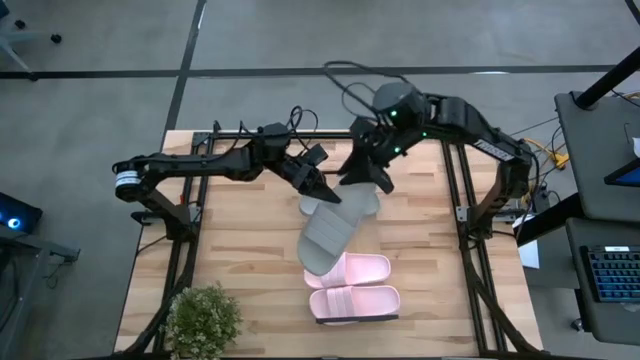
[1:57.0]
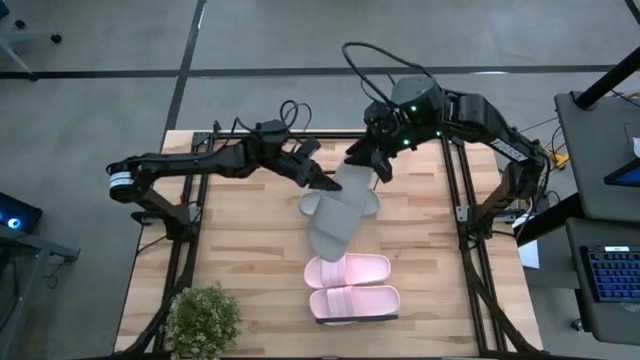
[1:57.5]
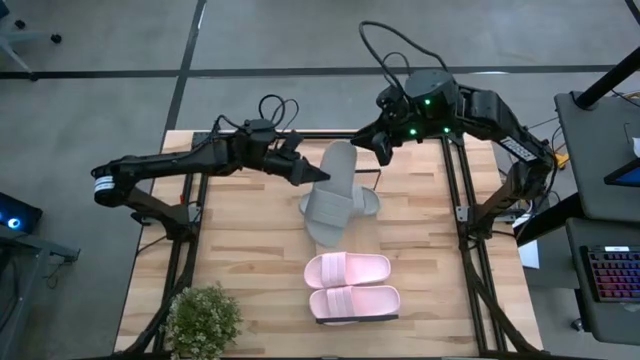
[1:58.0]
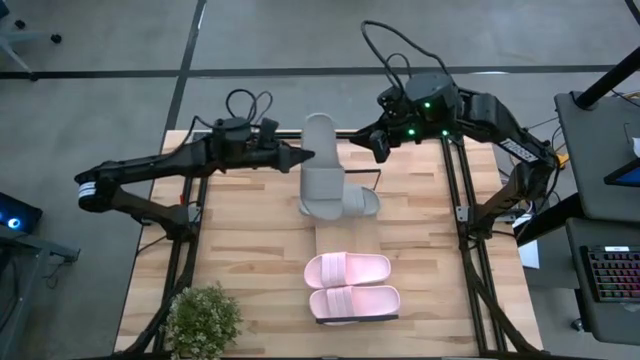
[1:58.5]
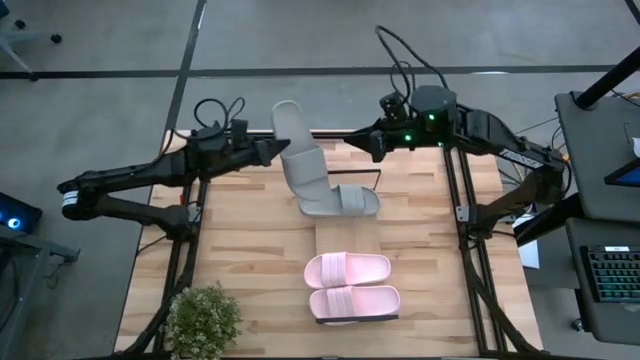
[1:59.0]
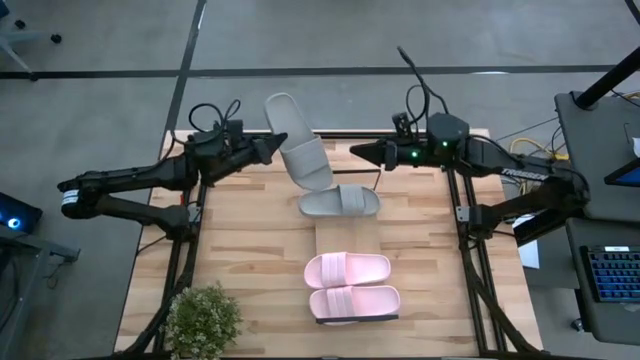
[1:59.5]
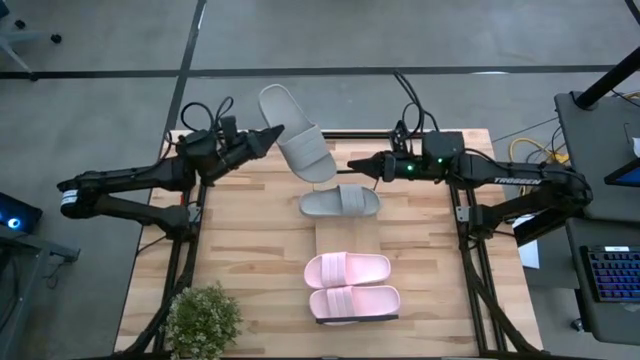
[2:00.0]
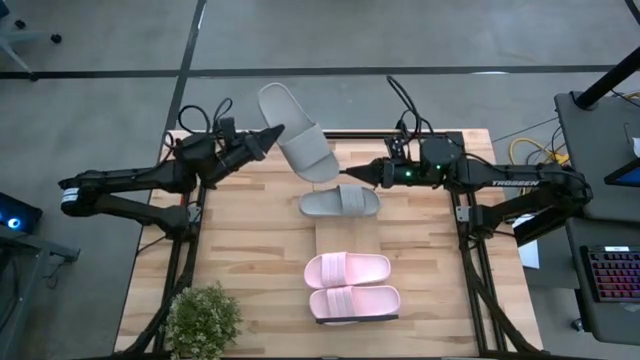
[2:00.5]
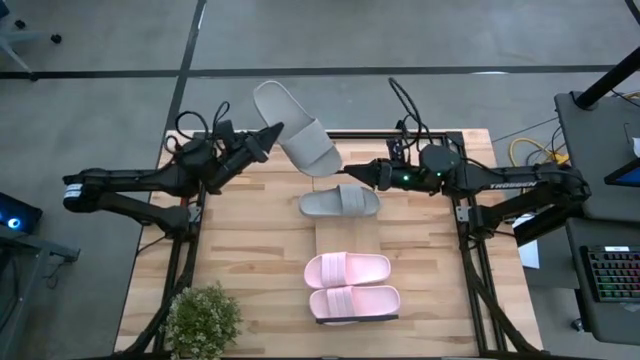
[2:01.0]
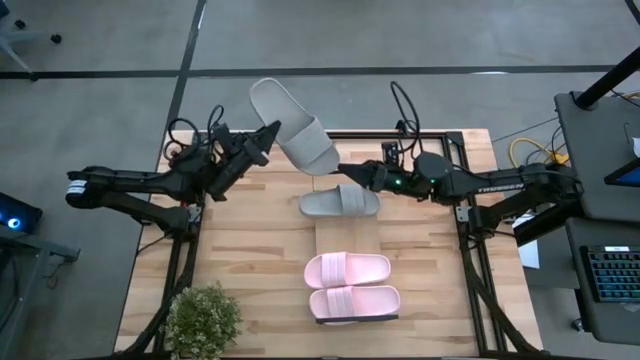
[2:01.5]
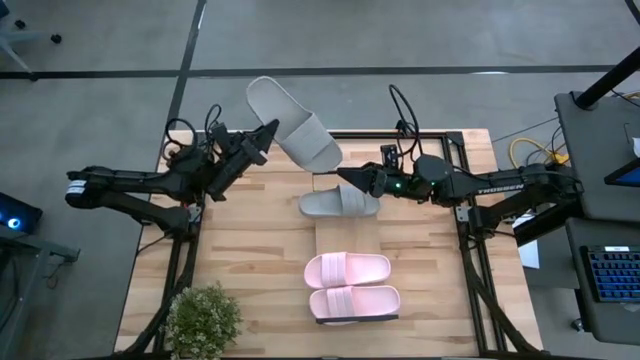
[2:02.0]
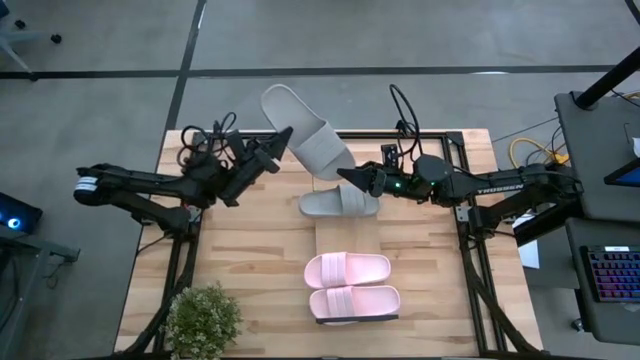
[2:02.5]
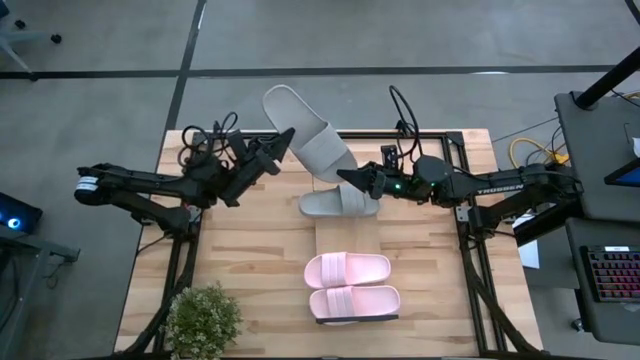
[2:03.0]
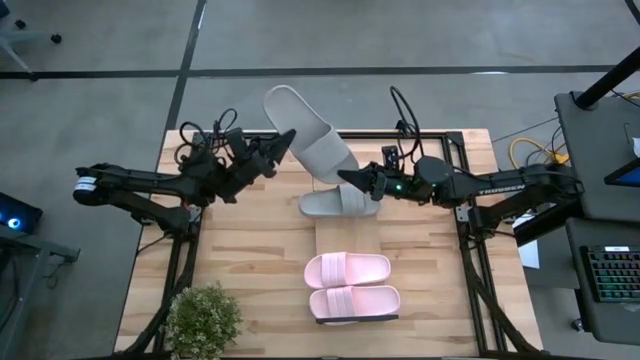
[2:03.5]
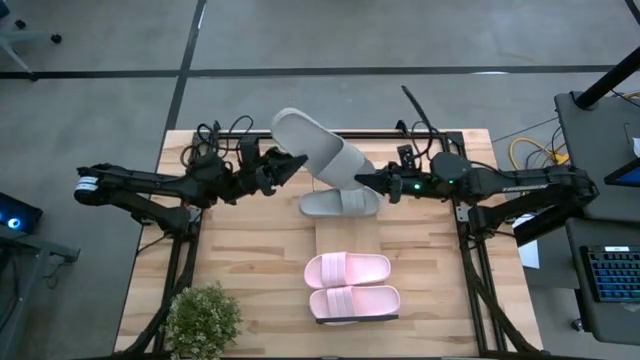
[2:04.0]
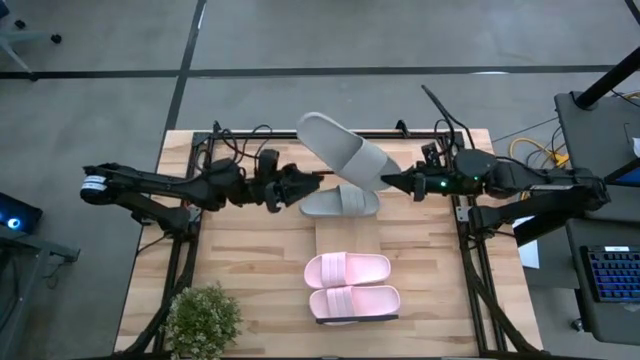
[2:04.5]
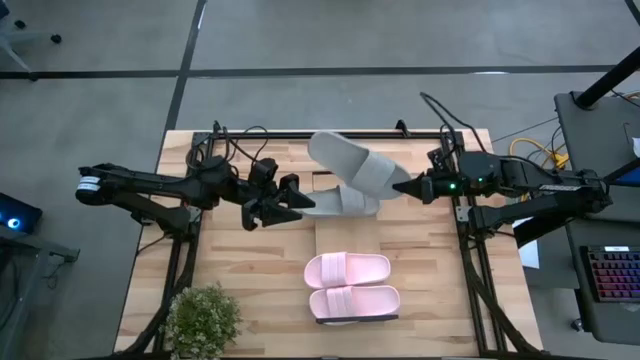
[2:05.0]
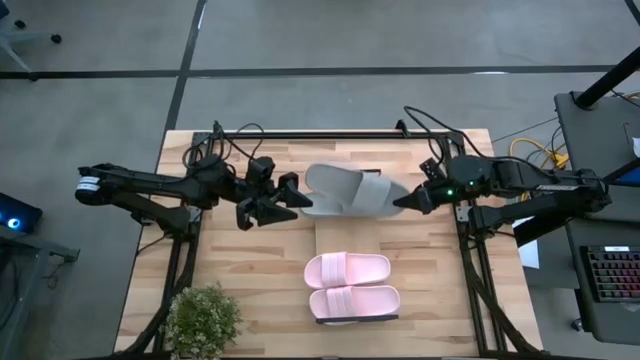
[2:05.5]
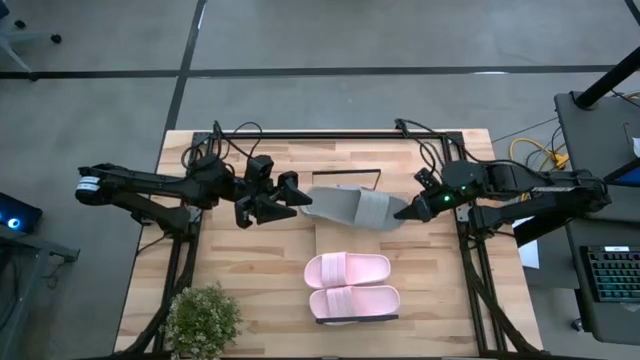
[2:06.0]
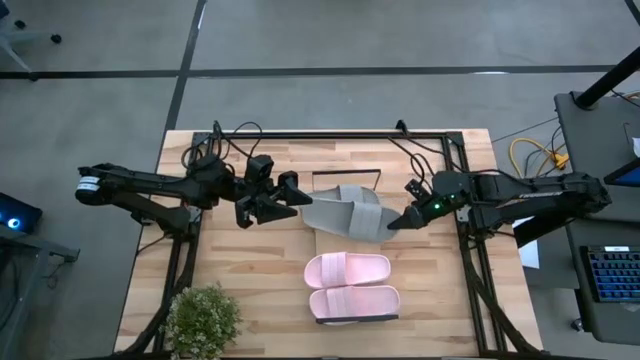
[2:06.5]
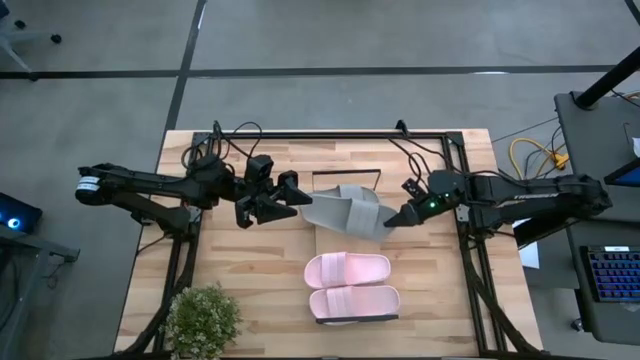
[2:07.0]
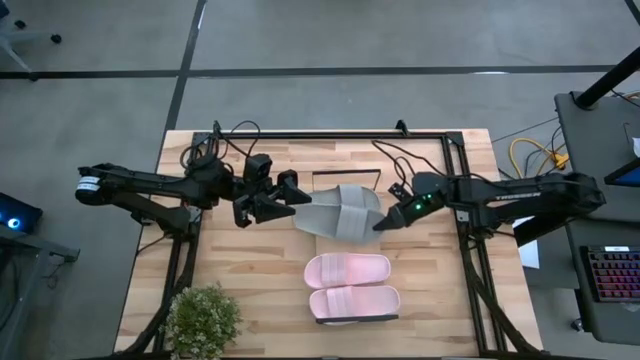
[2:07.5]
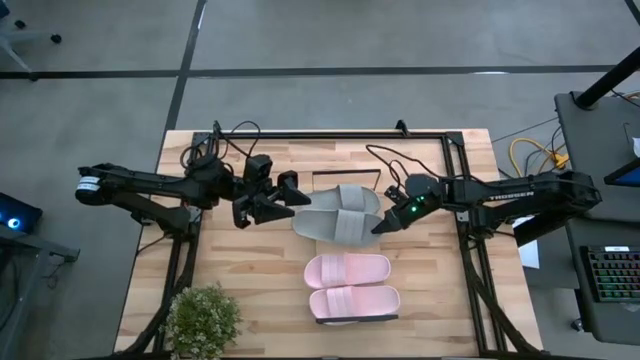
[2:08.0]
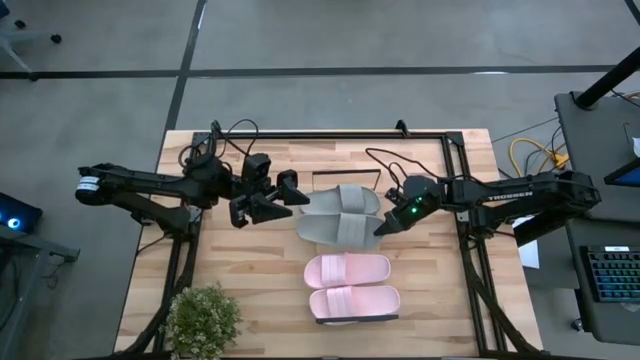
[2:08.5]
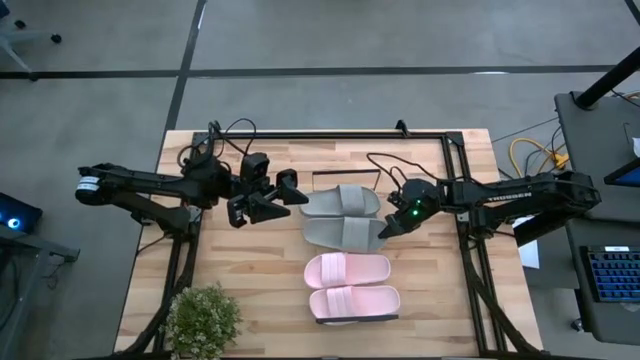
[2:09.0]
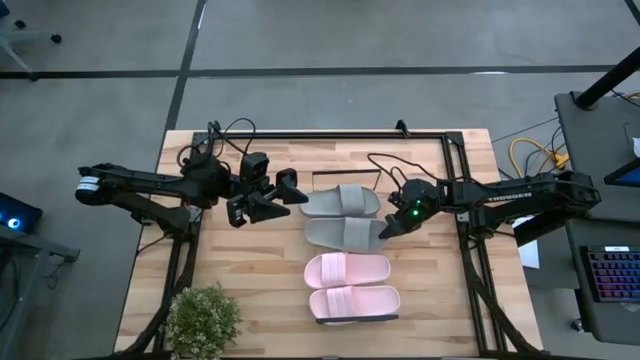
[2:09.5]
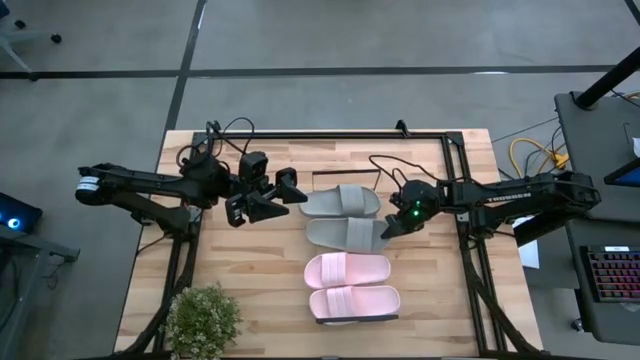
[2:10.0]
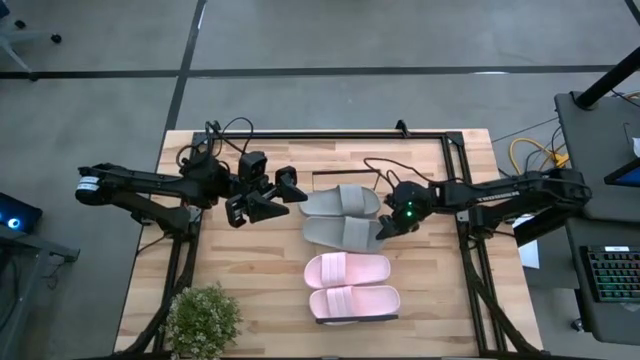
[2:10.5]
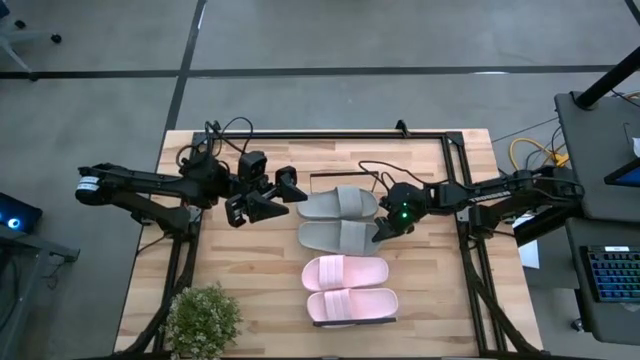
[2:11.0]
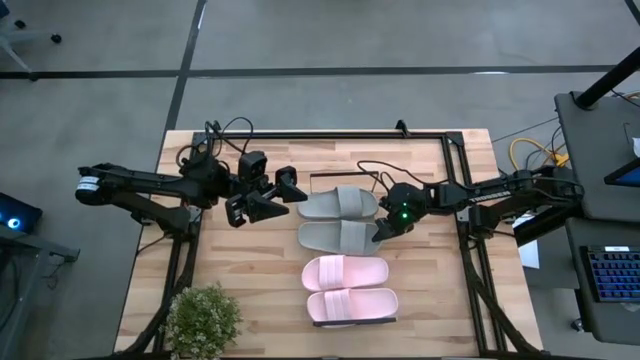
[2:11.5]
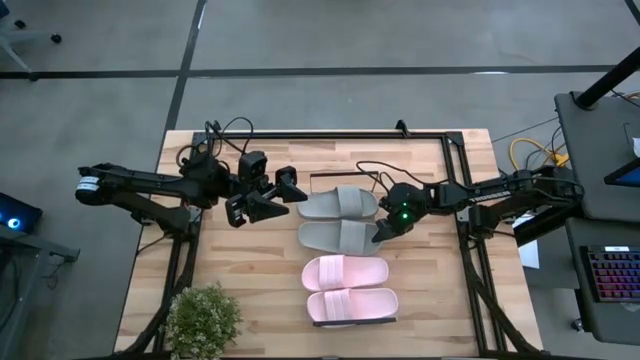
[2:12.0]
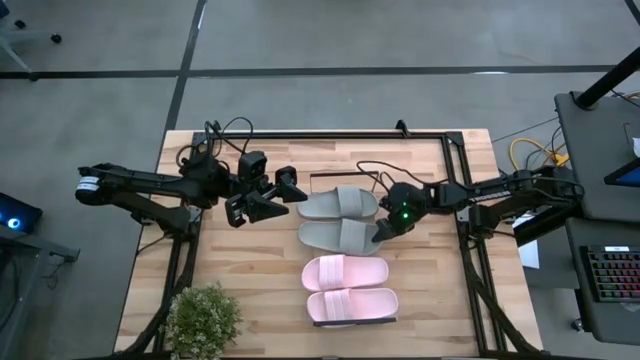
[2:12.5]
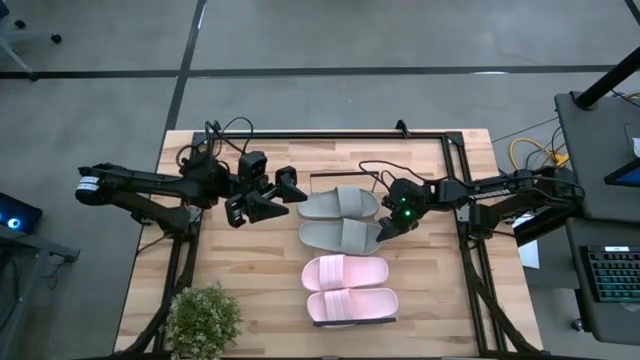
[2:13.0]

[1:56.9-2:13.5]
Task: Pick and place slides into the shelf
Put the gray slide on the shelf

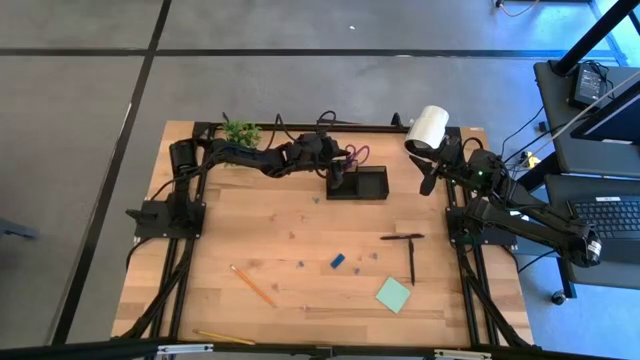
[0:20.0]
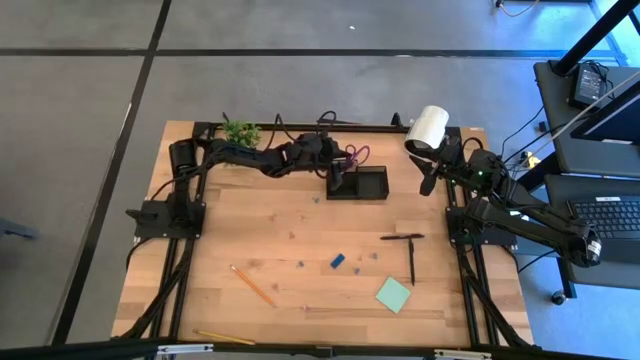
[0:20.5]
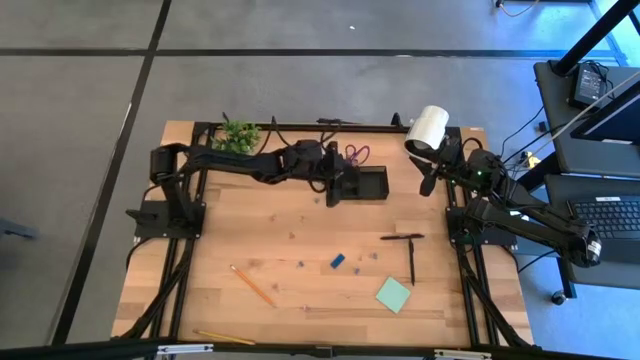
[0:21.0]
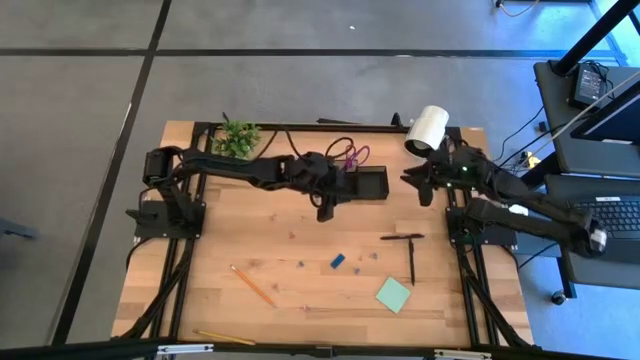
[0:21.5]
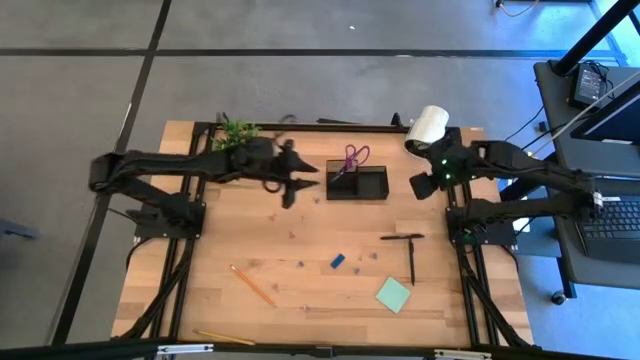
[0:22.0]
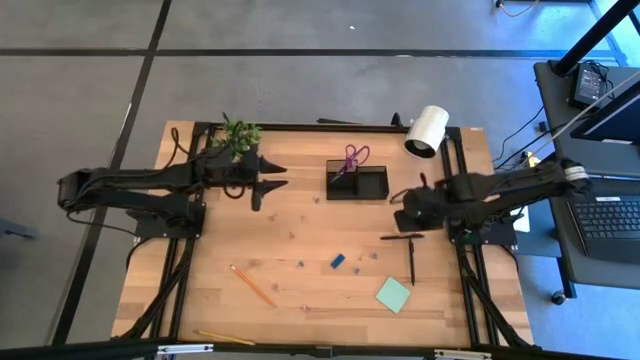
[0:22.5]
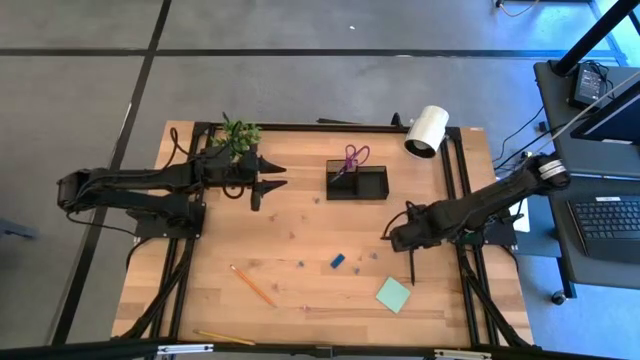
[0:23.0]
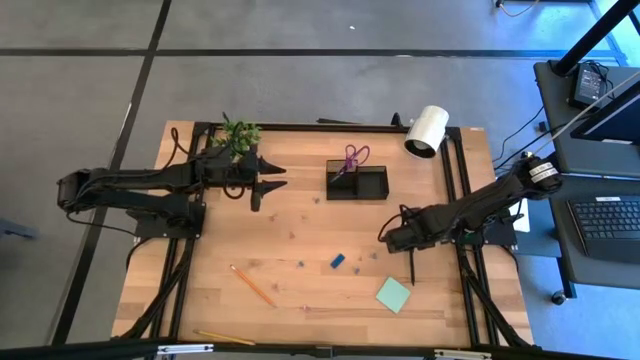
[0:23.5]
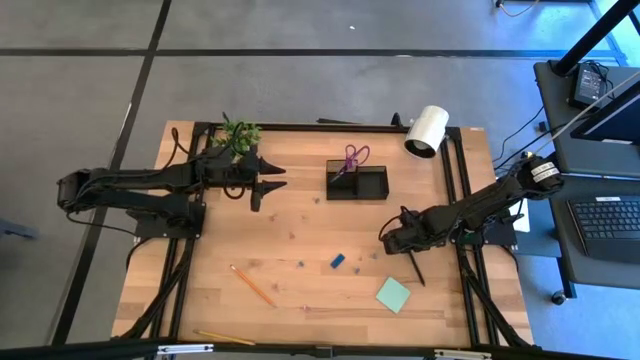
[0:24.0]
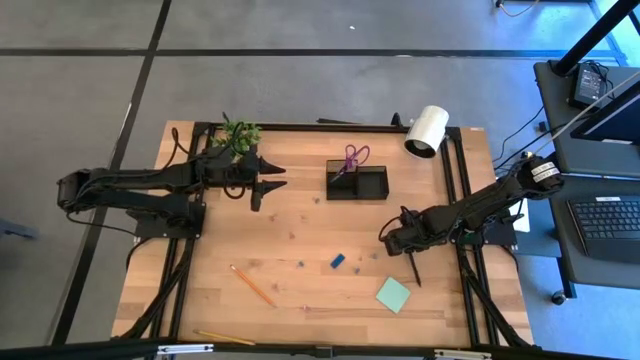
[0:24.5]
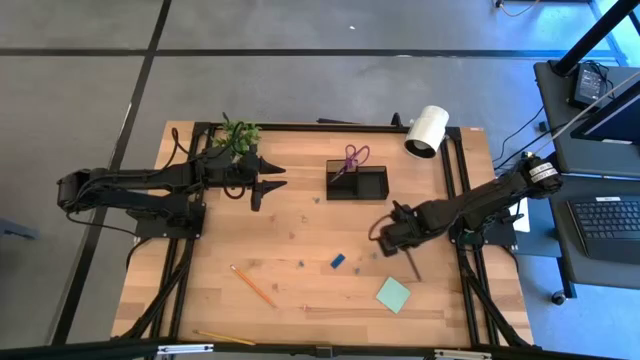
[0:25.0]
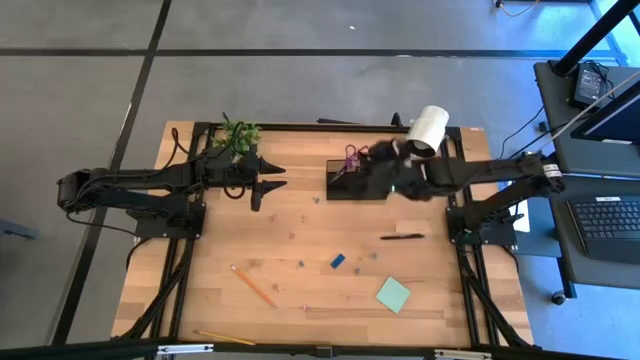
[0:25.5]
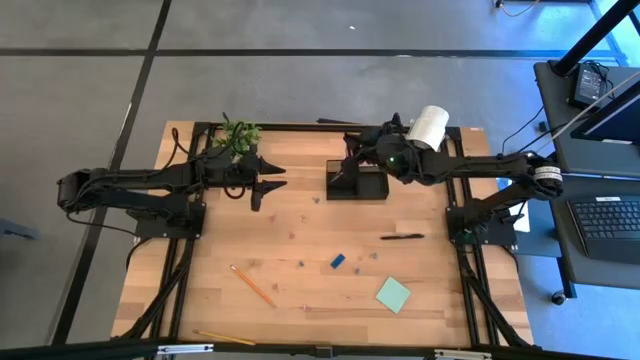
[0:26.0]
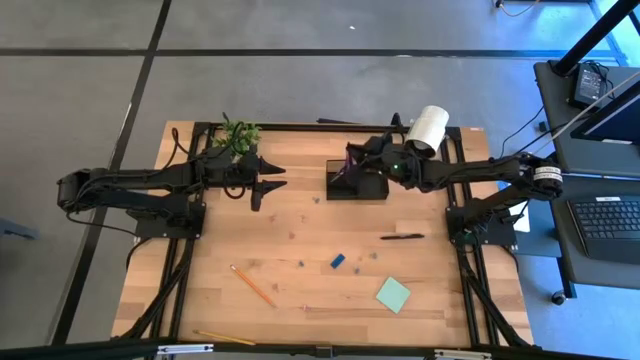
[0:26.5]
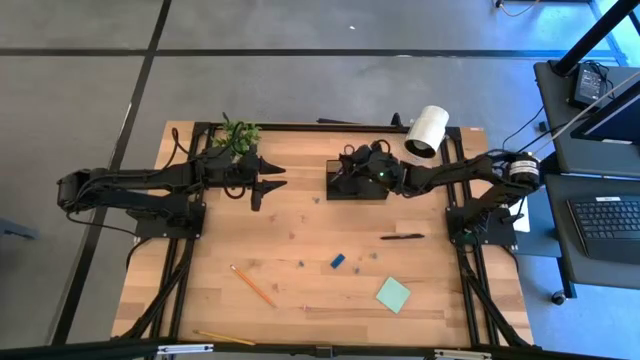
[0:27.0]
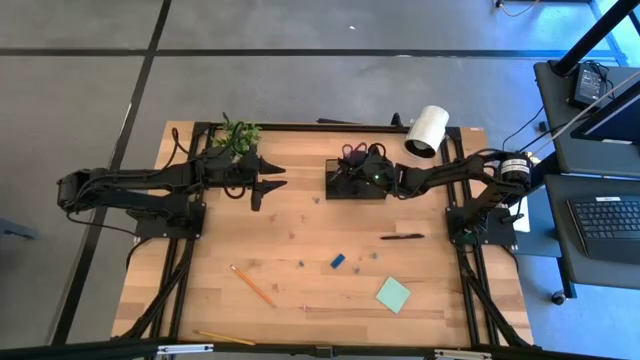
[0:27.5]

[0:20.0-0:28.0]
Task: Pick and place office supplies into organizer
Put the bottom black pen into the black desk organizer
